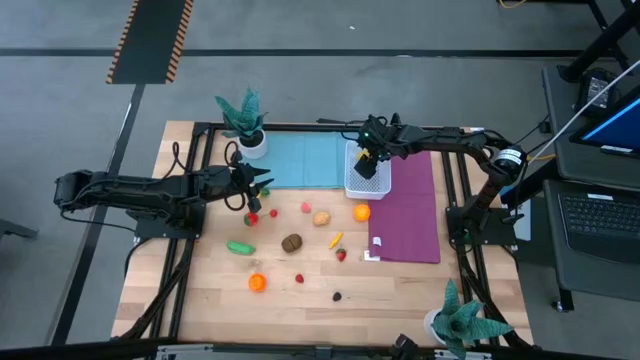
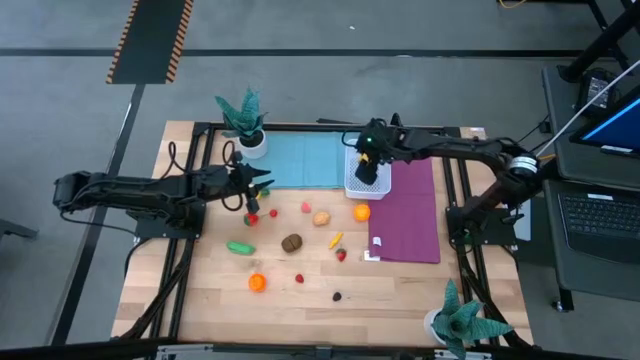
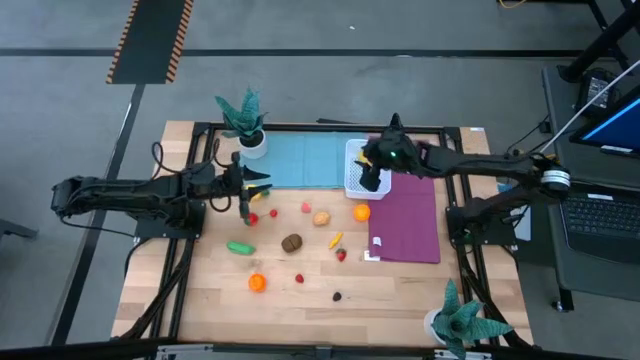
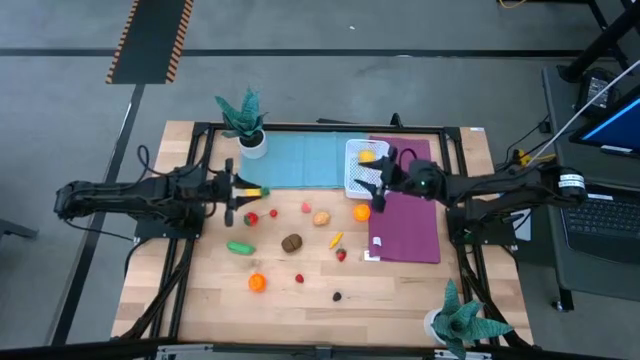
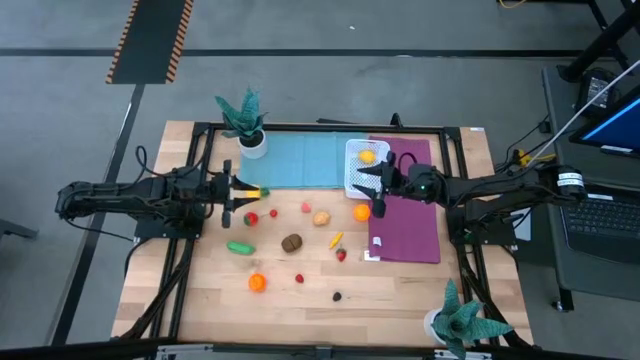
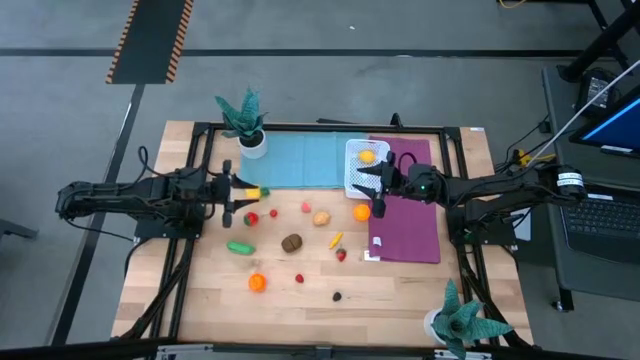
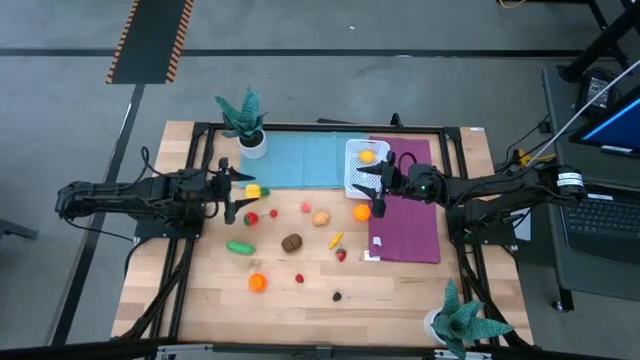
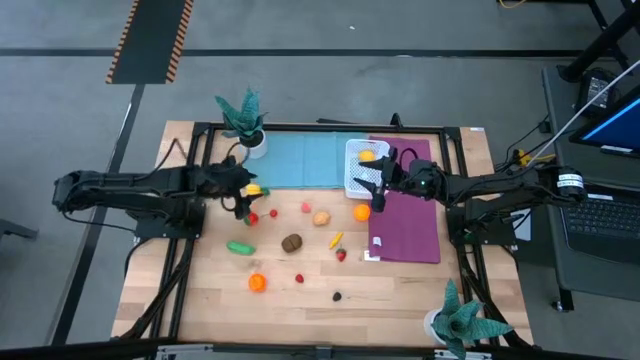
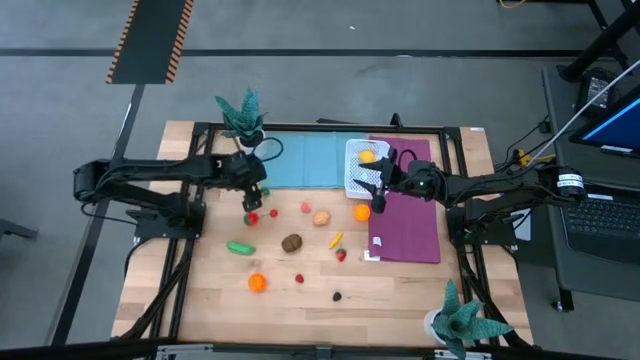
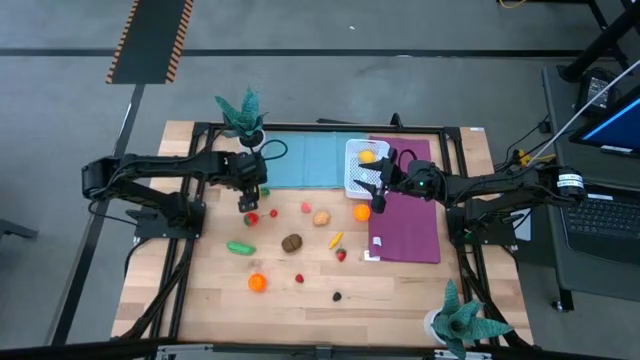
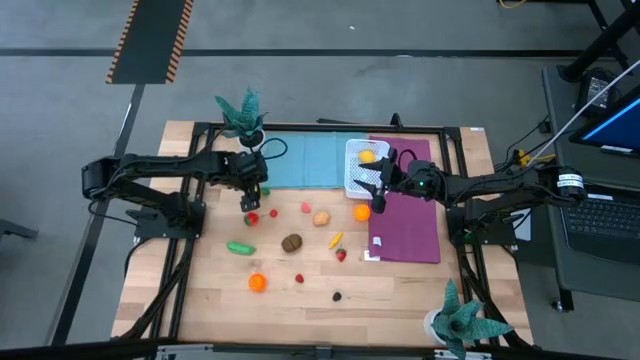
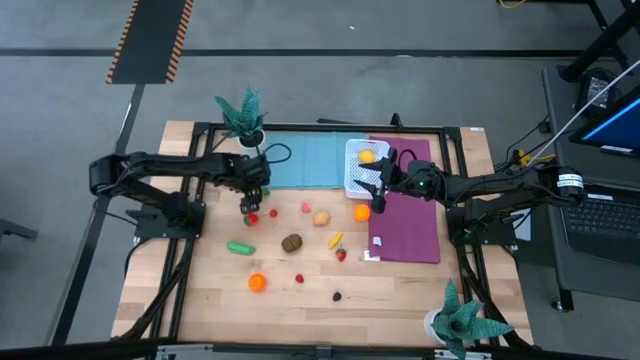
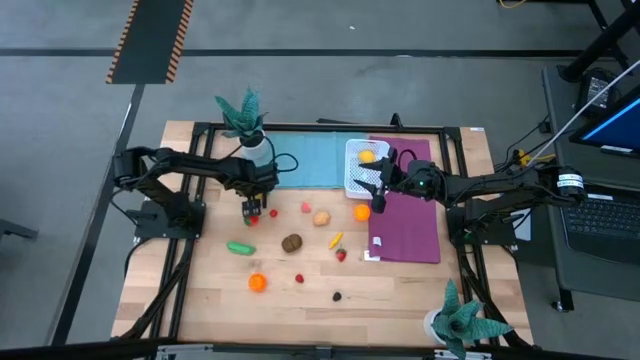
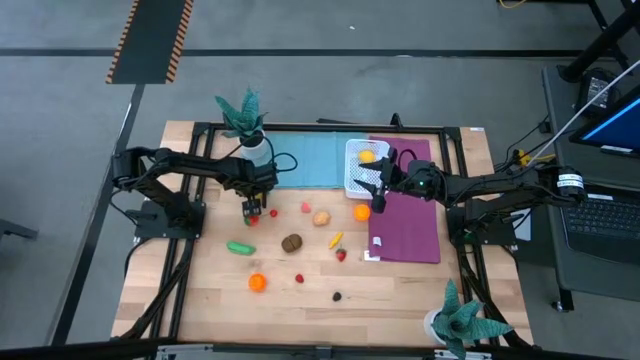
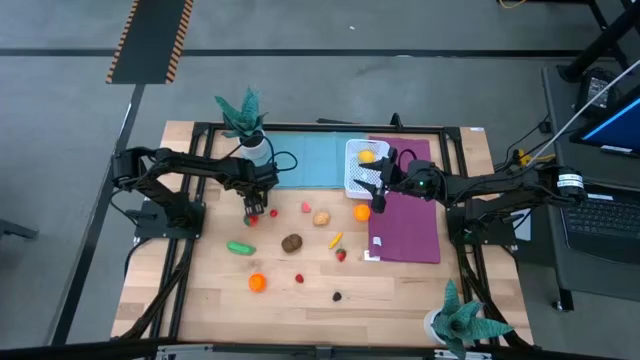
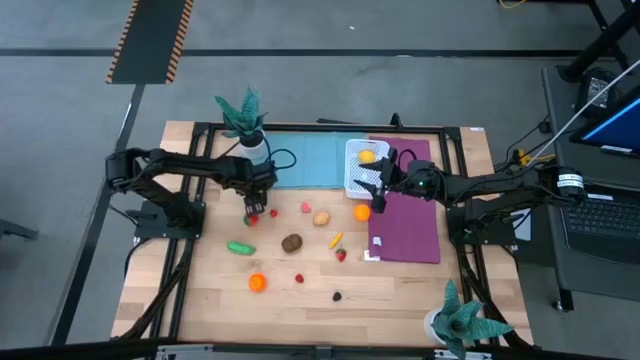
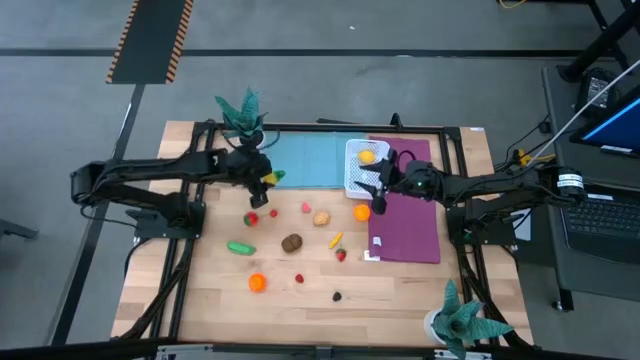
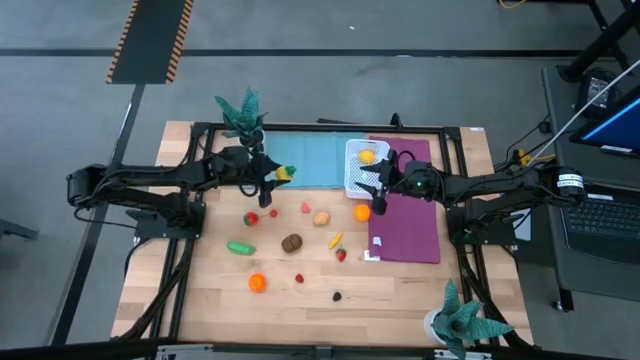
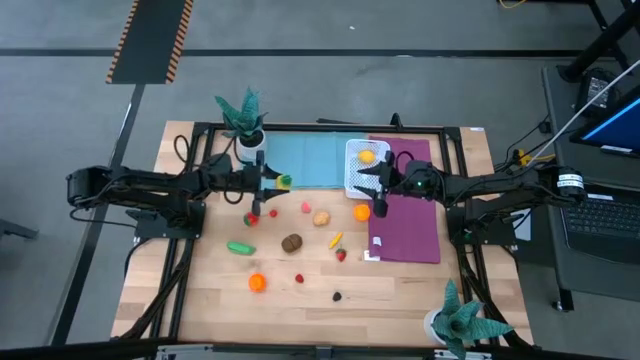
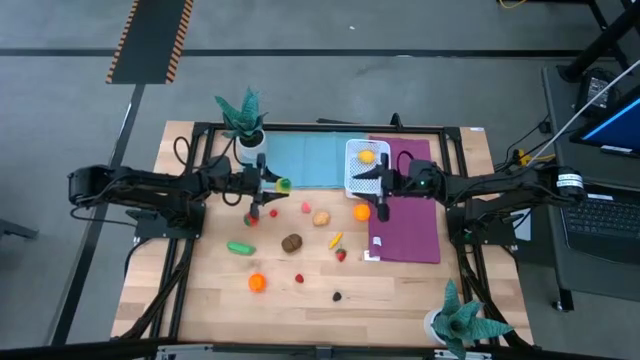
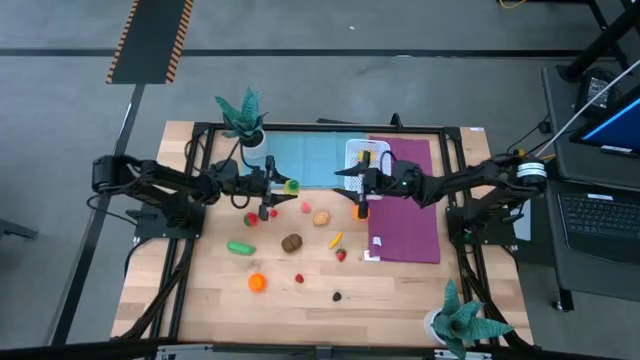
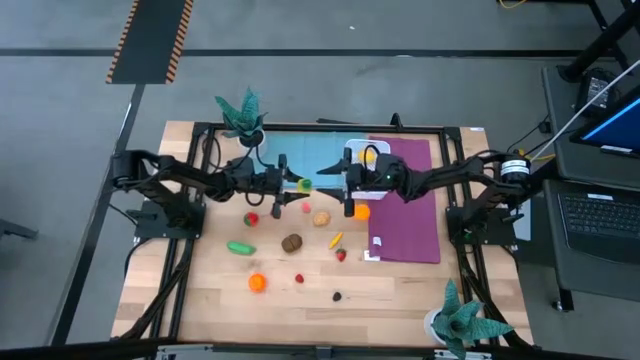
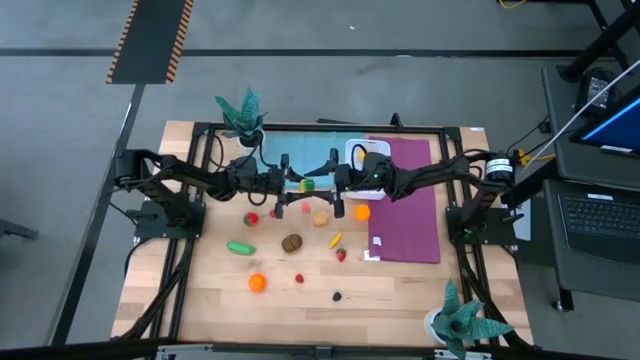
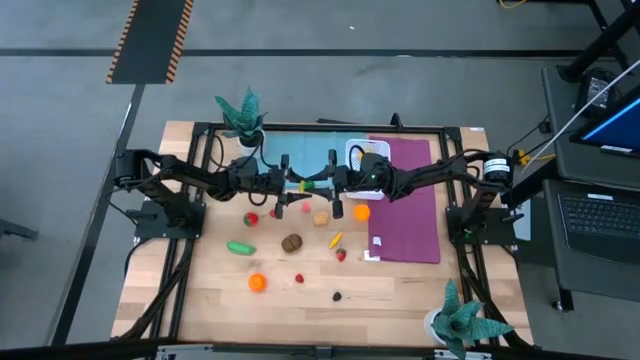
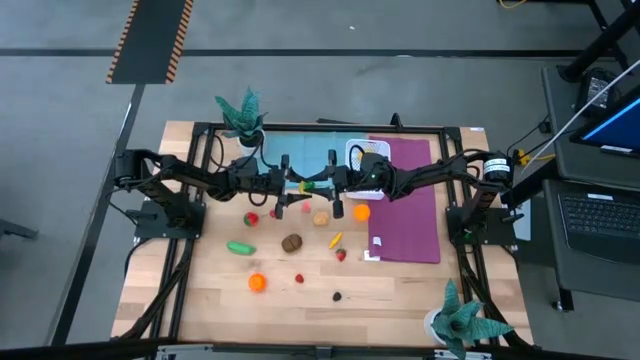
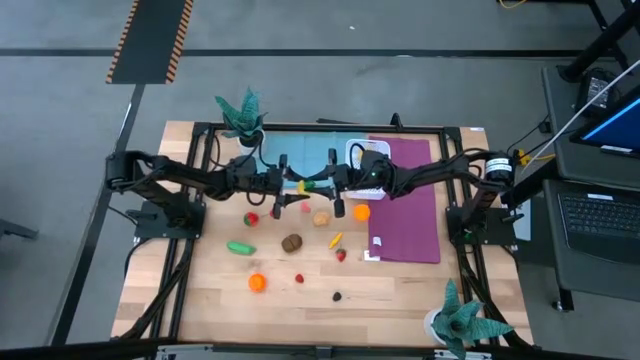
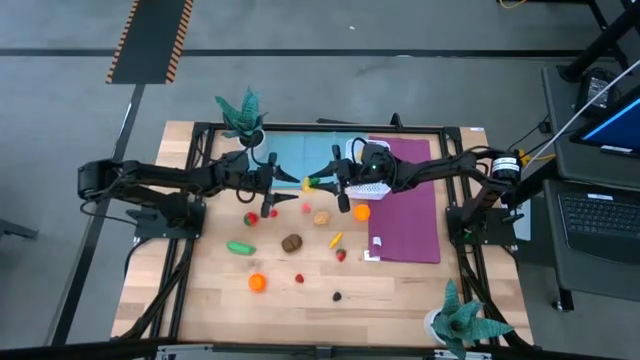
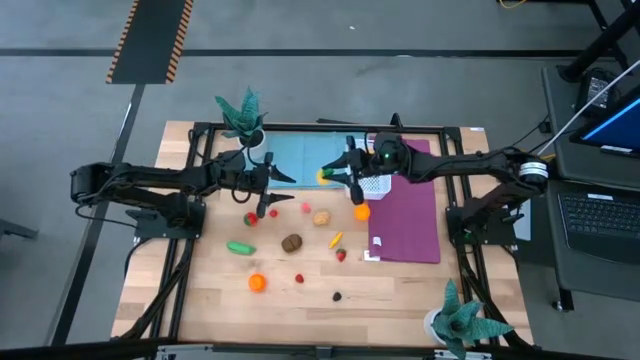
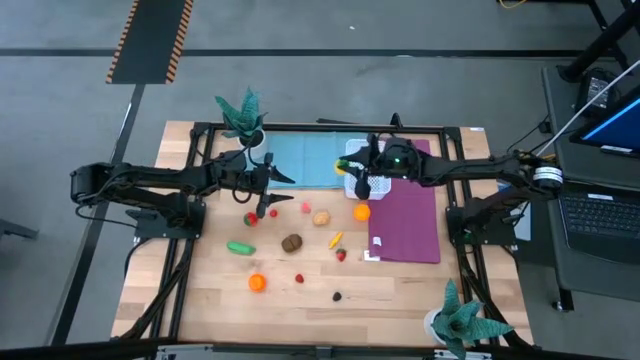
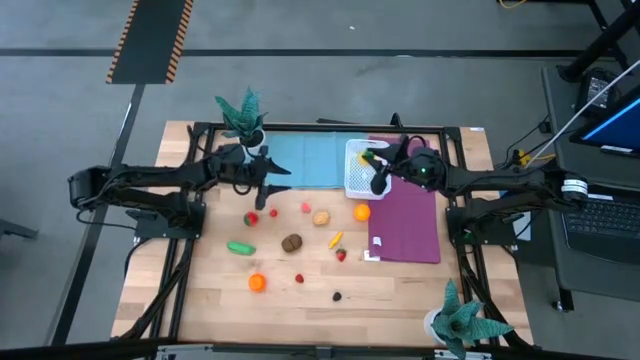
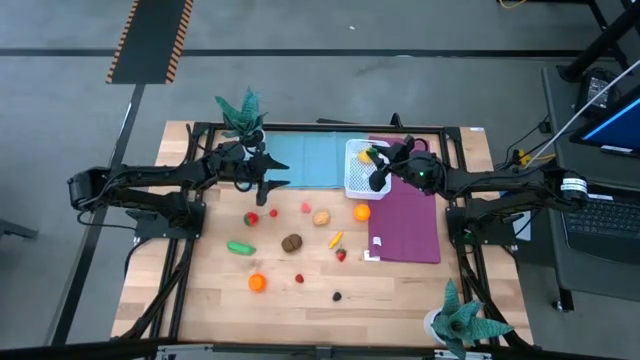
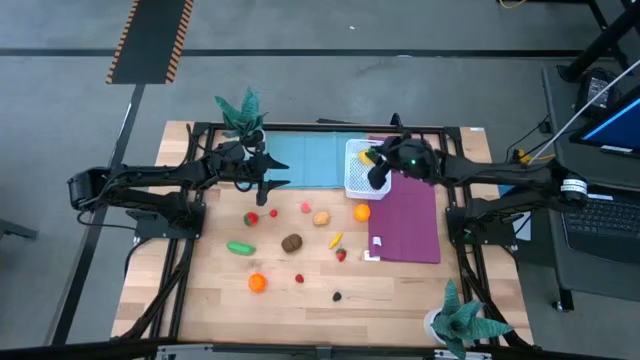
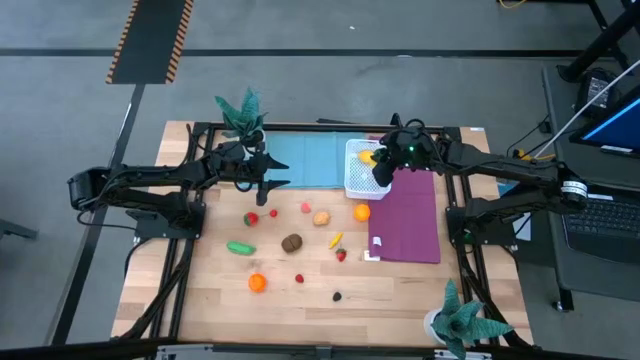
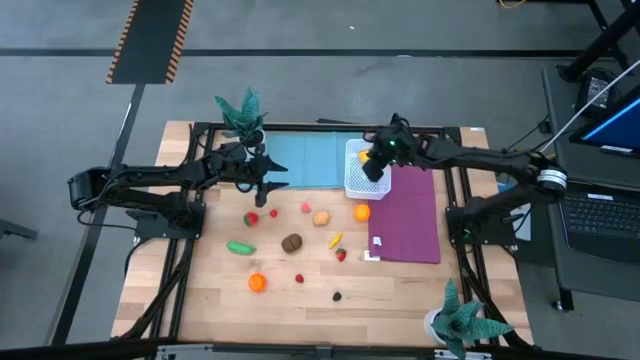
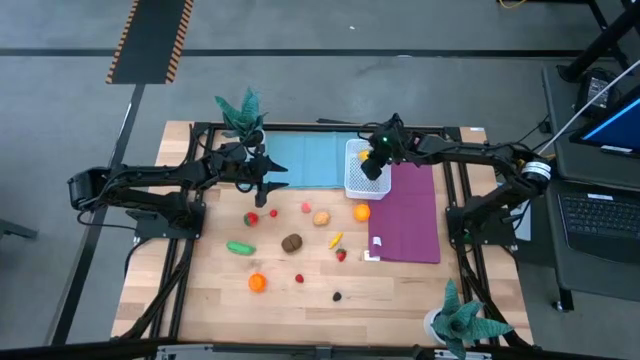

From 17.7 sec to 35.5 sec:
Task: Pick and placing Produce into tupperware
Put the yellow pineapple into the white container

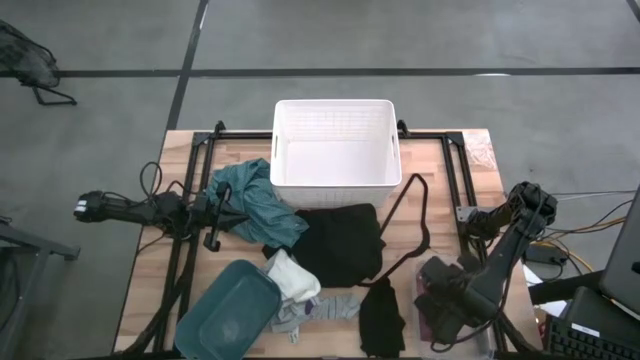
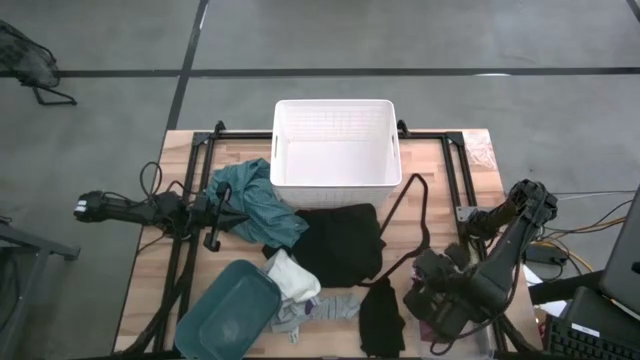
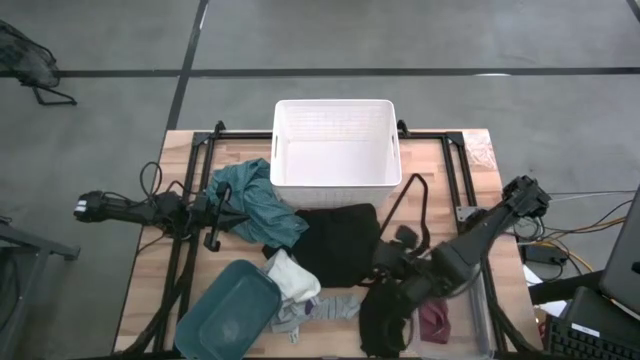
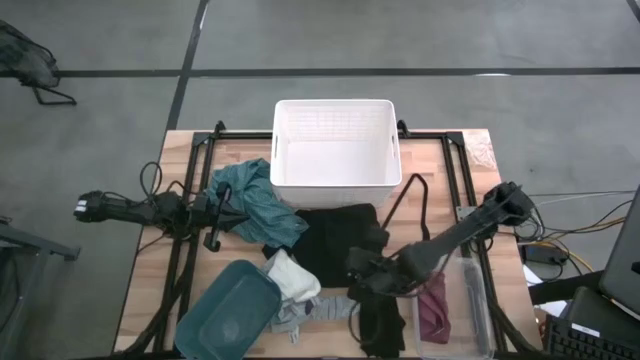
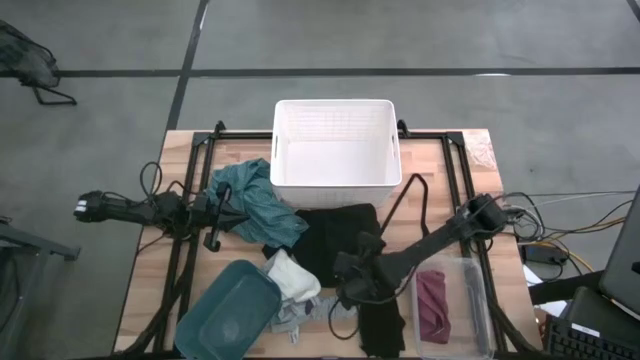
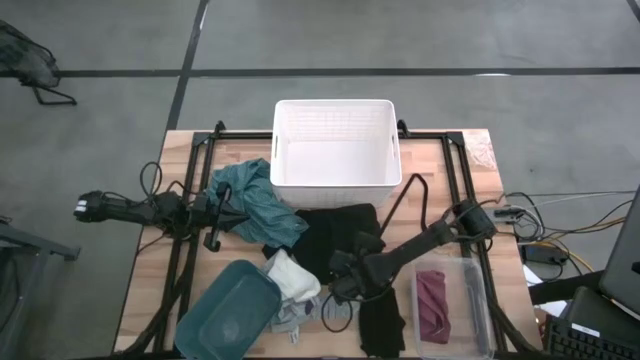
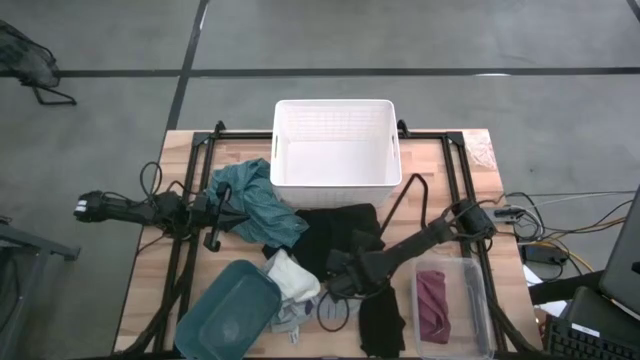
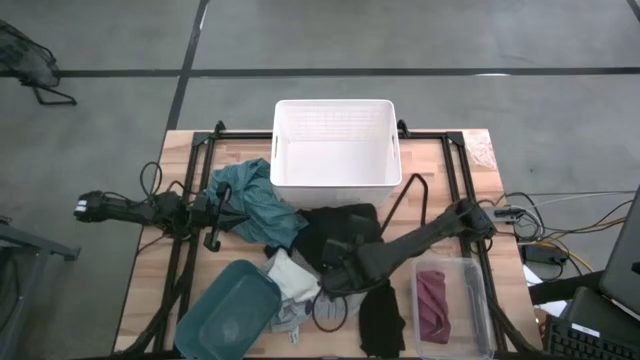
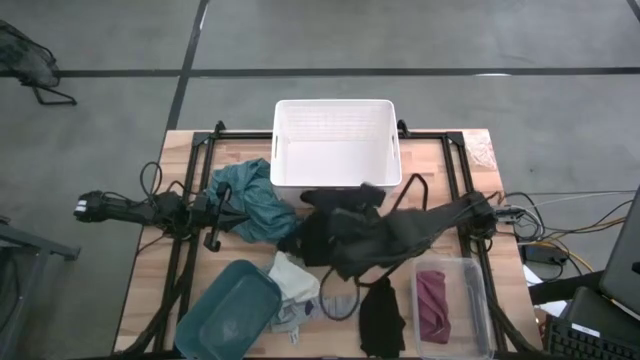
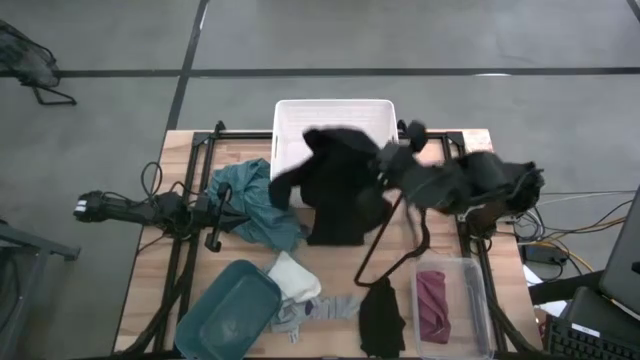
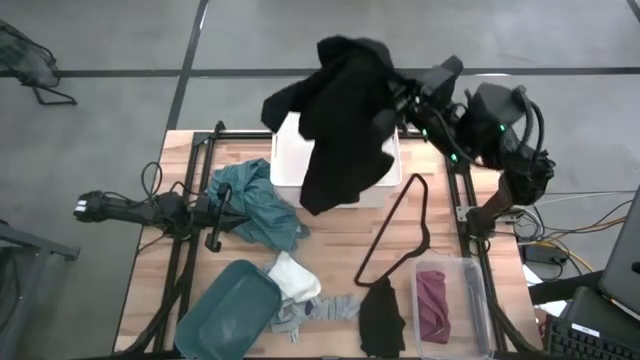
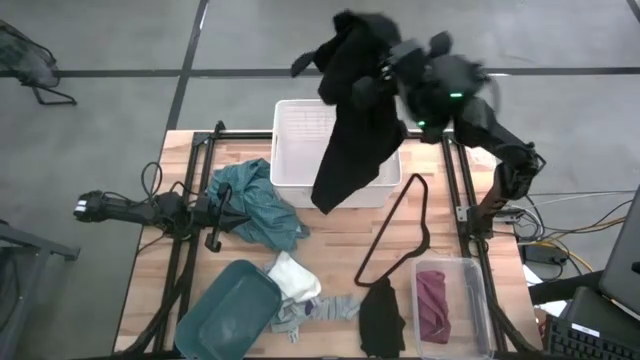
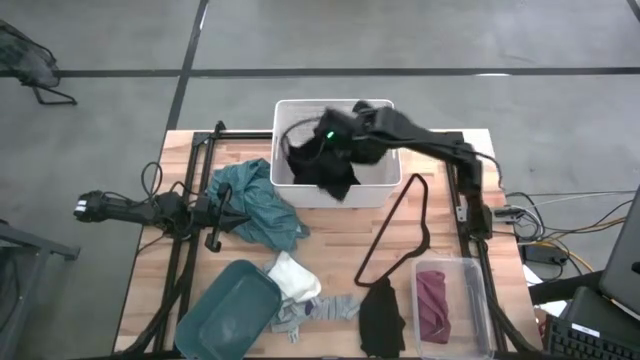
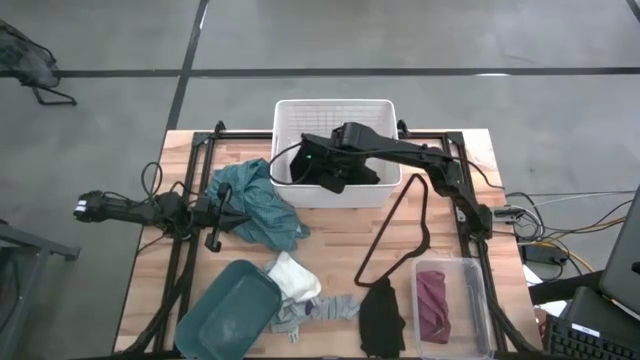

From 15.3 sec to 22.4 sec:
Task: Pick & Place Cloths
Put the black shirt into the white bin
